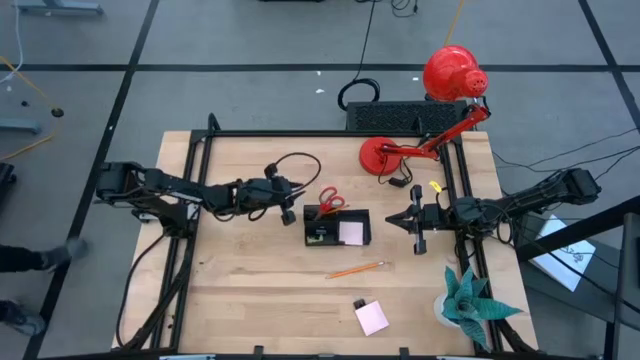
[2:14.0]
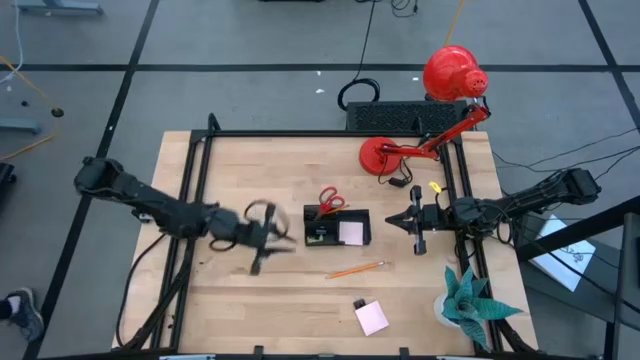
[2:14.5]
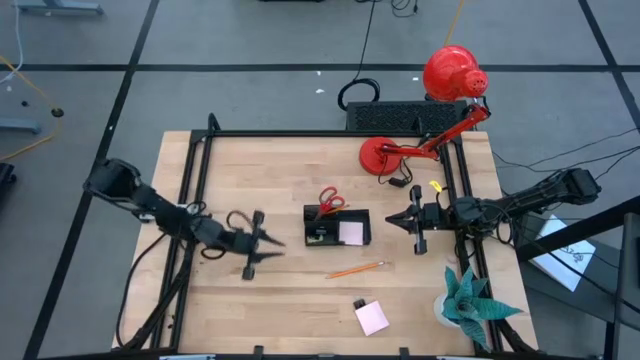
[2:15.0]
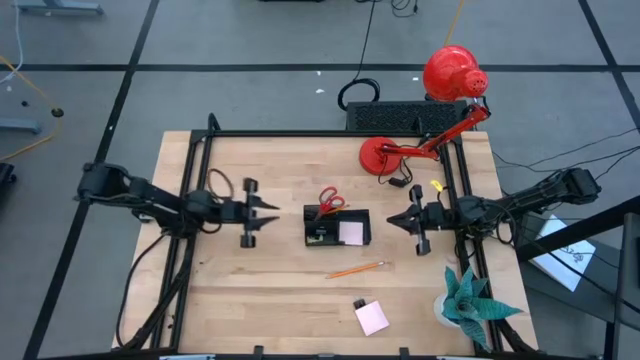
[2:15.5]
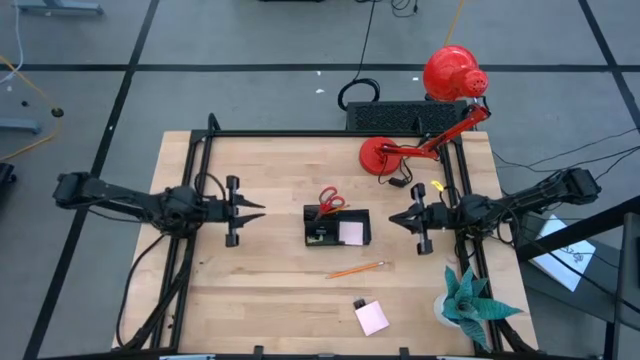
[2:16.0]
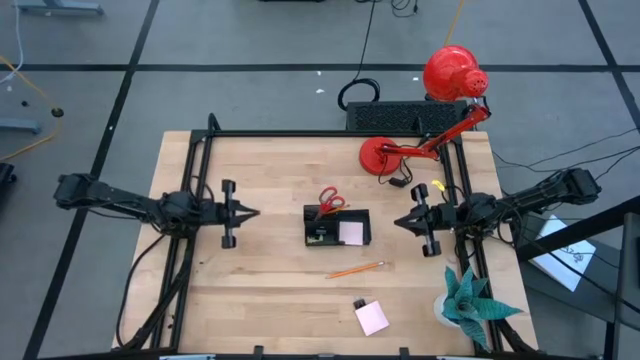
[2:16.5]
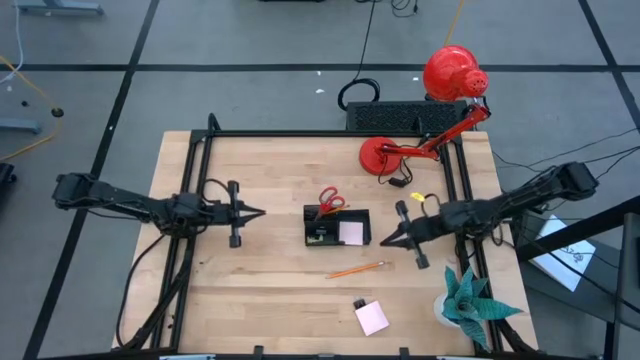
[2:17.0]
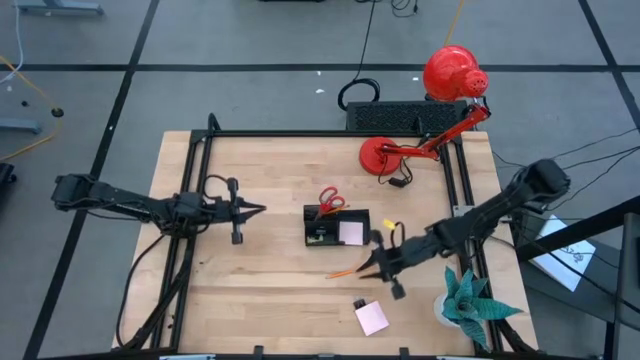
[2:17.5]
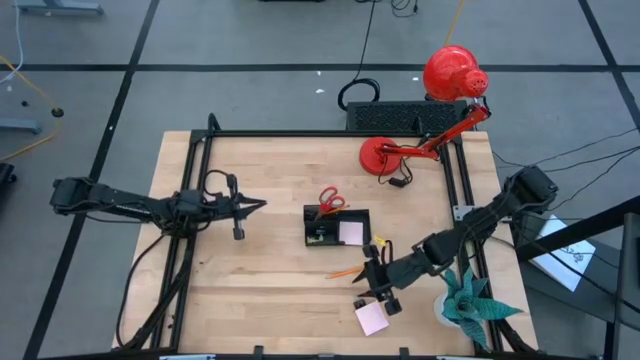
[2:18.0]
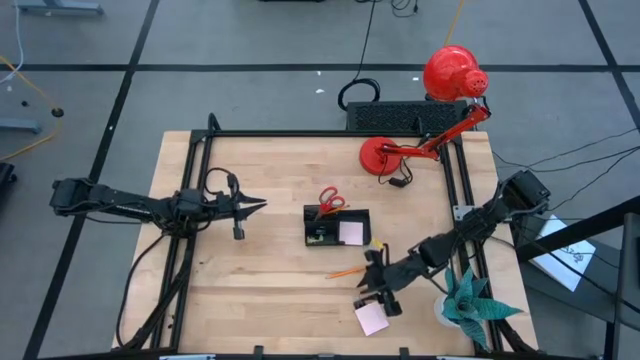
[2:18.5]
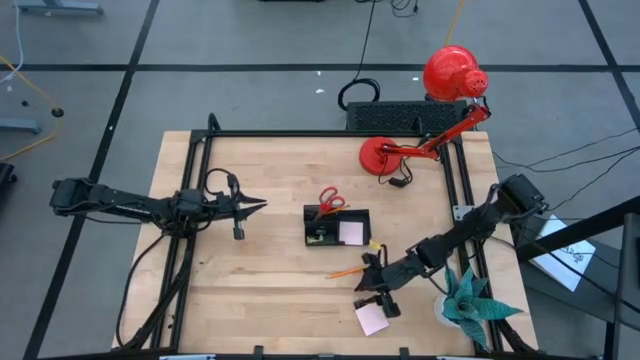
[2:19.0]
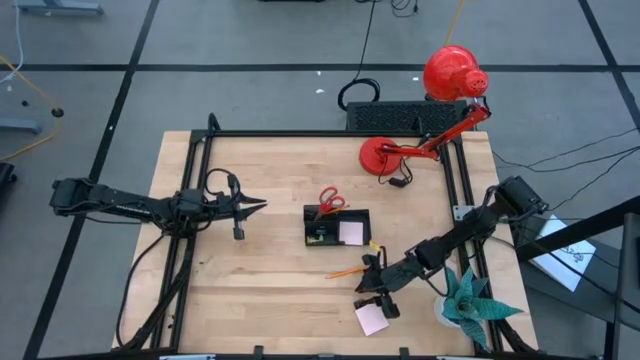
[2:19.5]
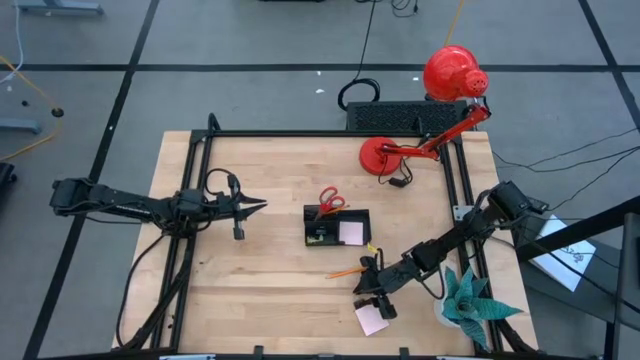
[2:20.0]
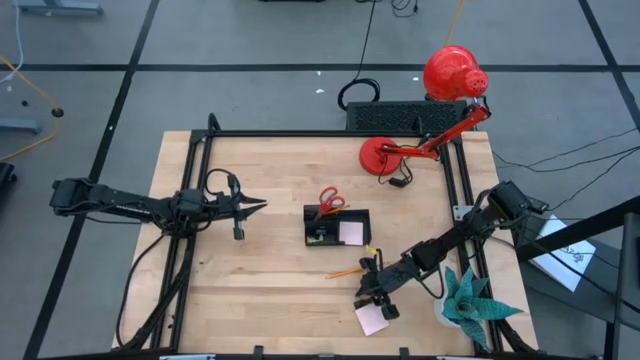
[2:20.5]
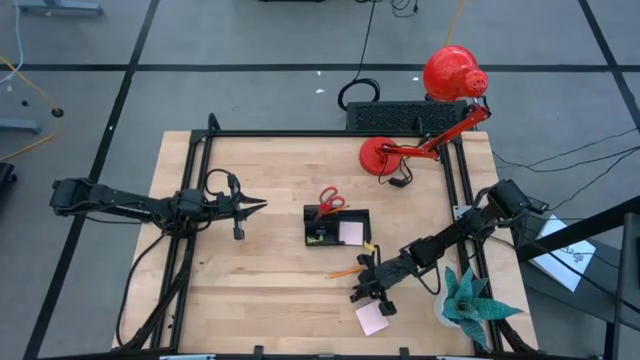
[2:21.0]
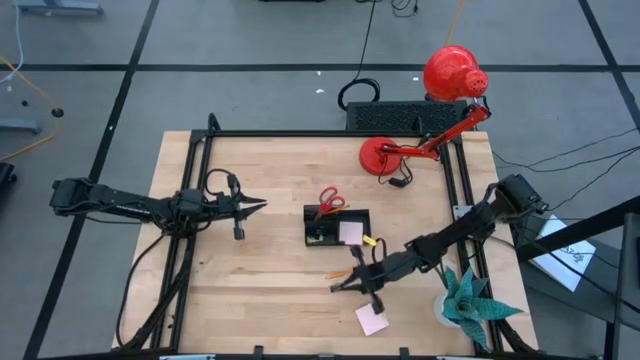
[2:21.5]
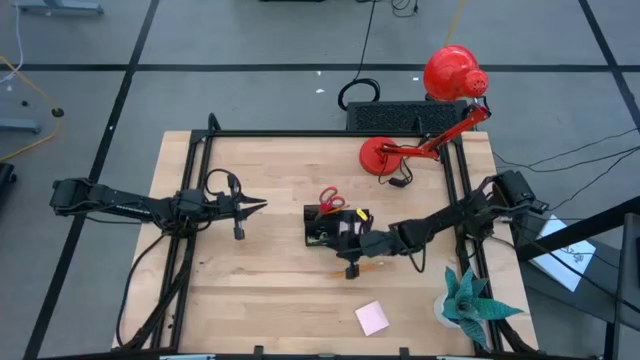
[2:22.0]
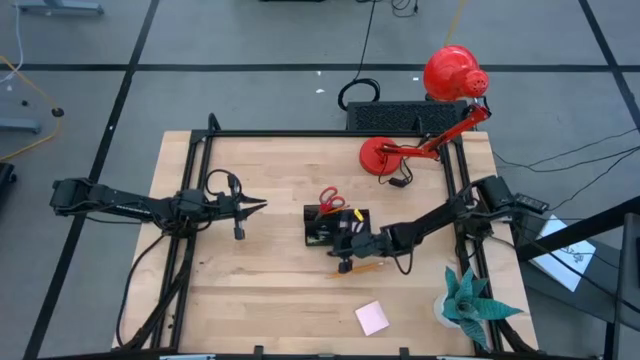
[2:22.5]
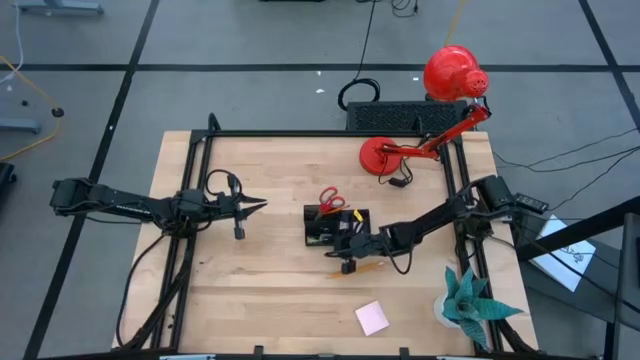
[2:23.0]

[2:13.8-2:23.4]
Task: Pick and place office supplies into organizer
Put the binder clip into the bottom left compartment of the desk organizer

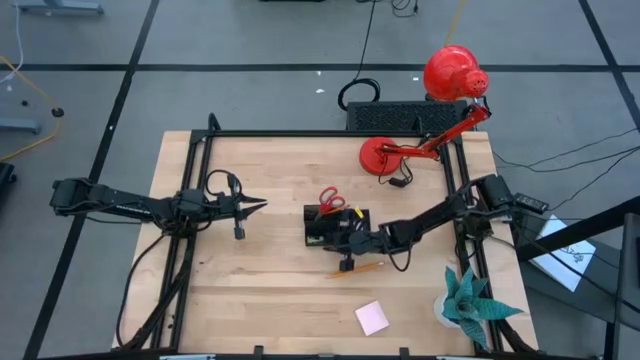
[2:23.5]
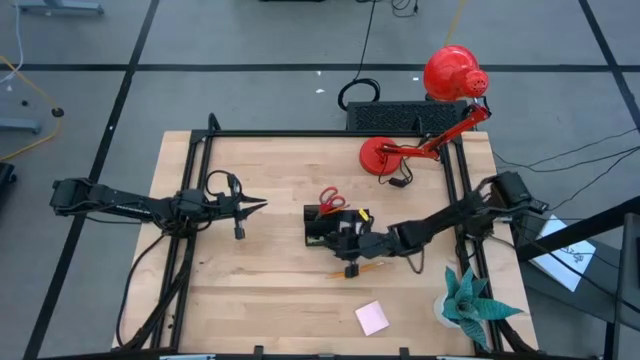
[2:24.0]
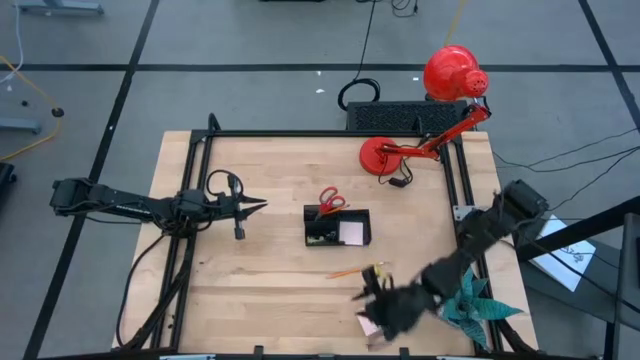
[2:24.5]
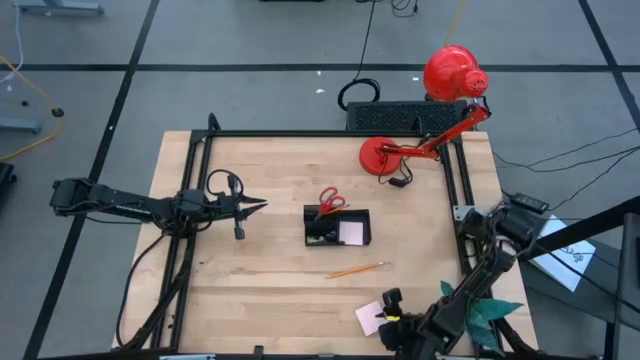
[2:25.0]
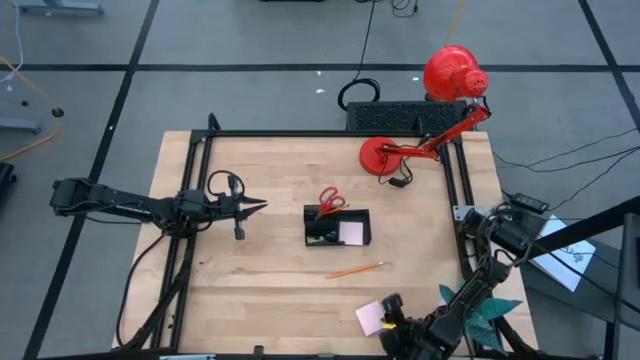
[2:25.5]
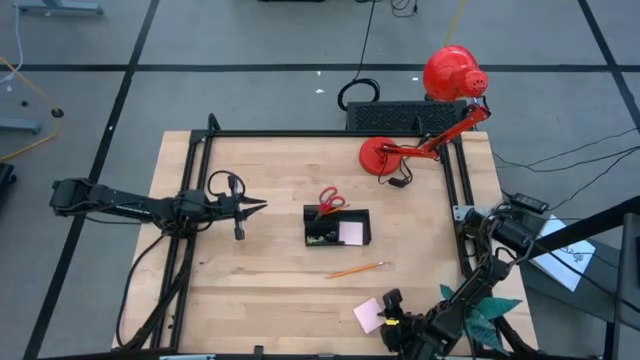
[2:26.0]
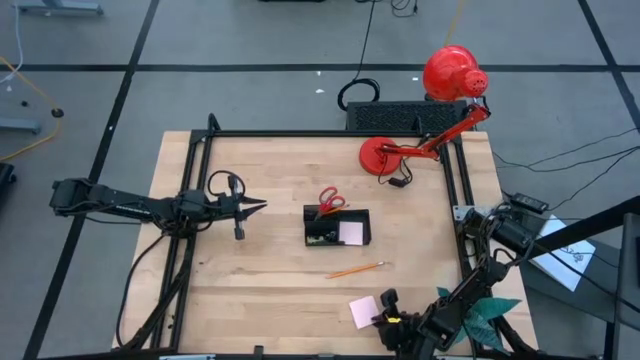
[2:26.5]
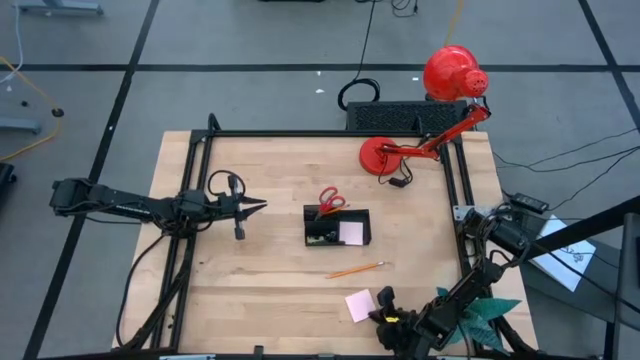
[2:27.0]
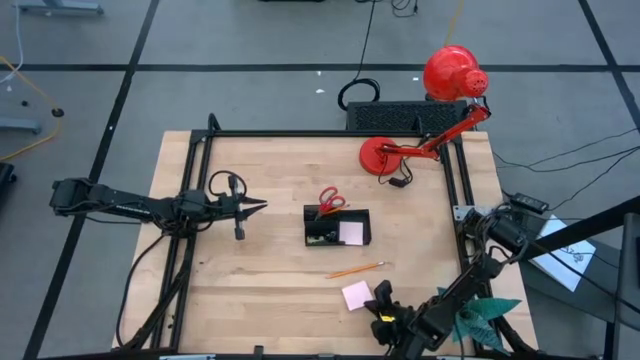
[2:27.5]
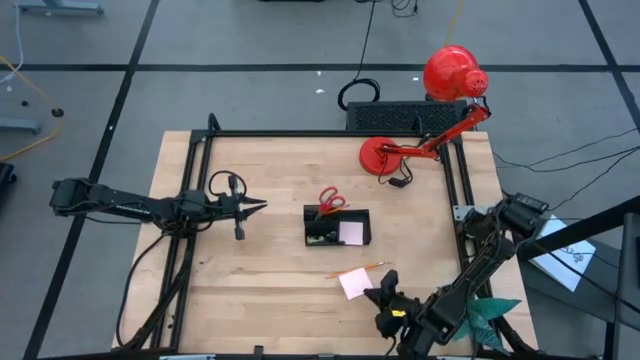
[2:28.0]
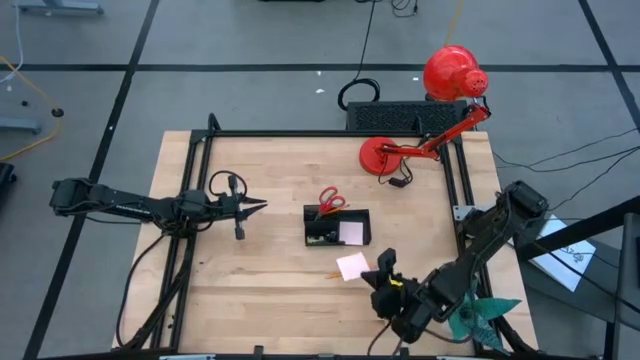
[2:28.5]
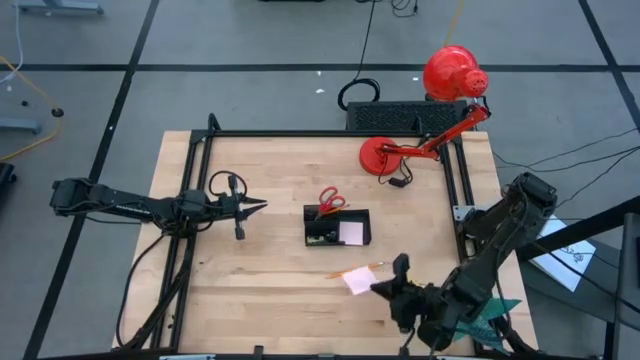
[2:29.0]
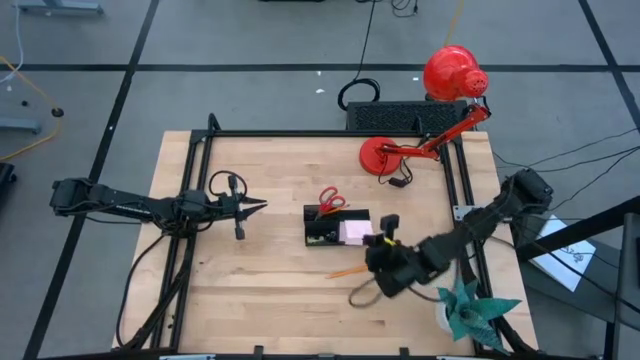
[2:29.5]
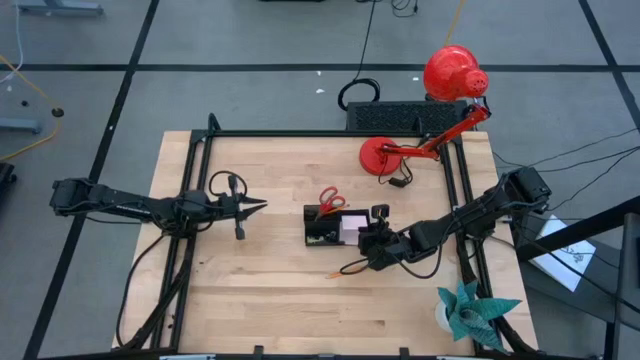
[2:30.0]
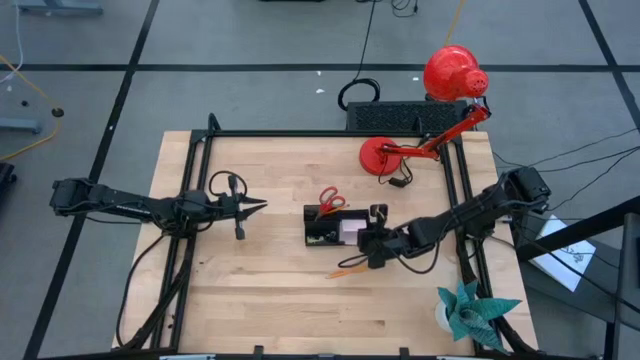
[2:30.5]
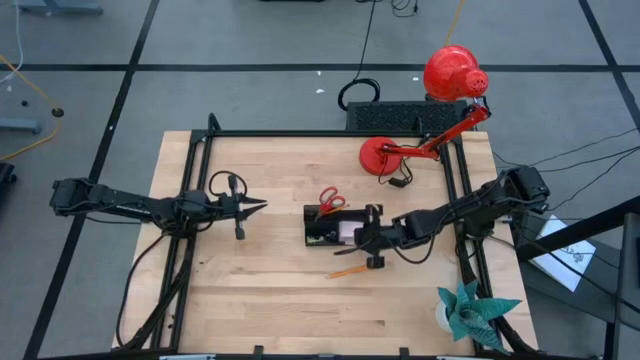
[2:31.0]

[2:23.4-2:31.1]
Put the sticky note into the desk organizer

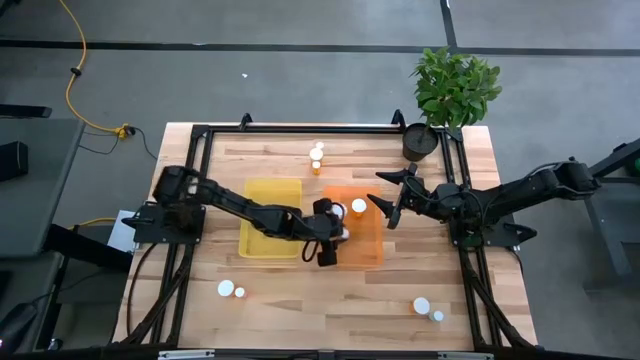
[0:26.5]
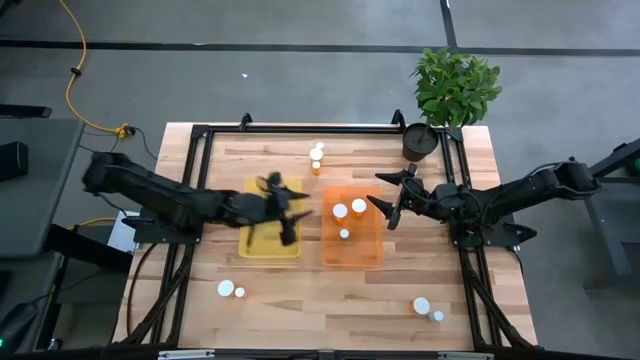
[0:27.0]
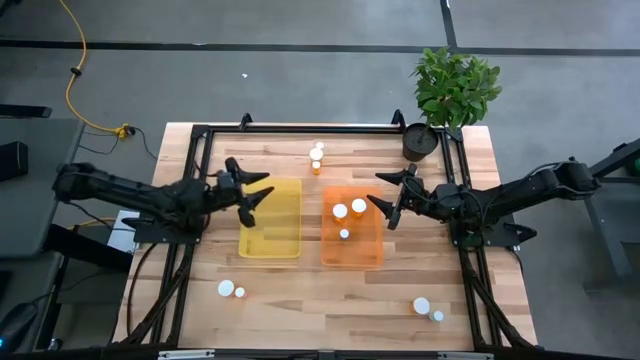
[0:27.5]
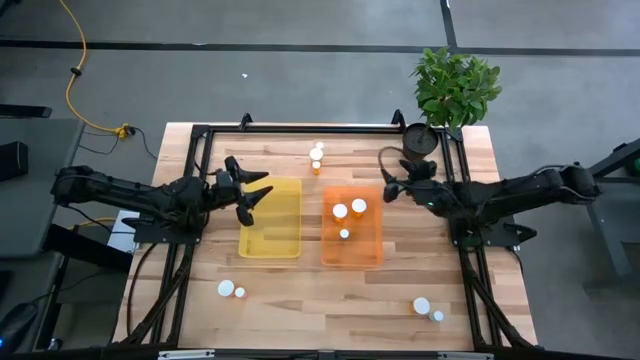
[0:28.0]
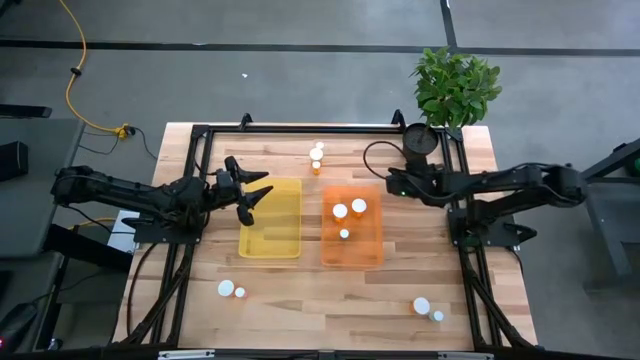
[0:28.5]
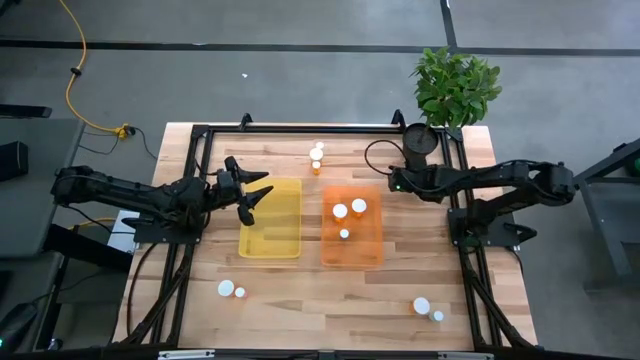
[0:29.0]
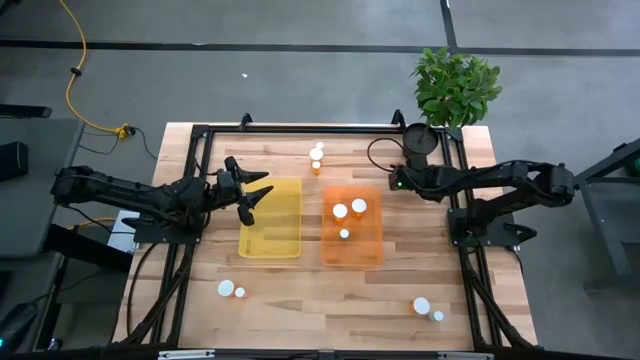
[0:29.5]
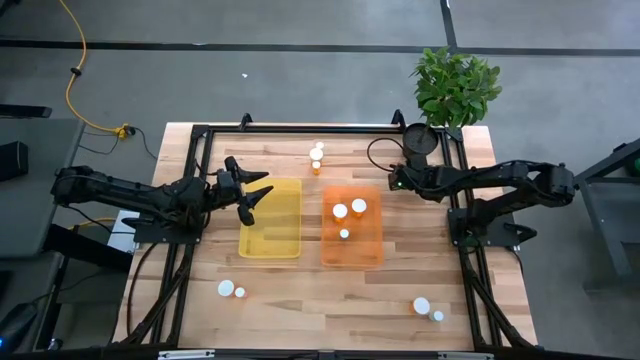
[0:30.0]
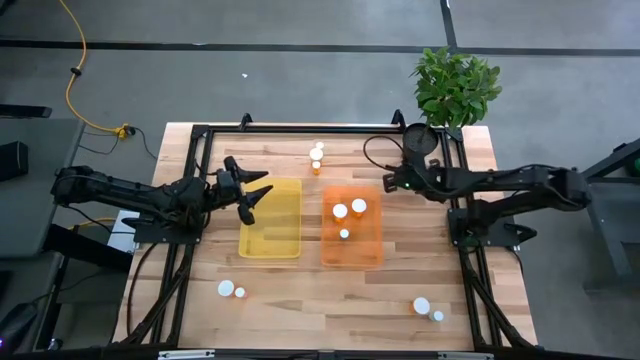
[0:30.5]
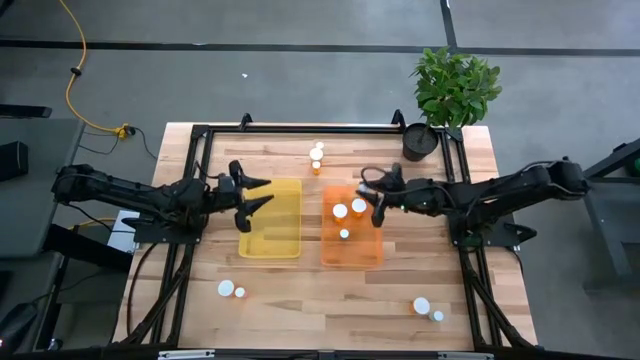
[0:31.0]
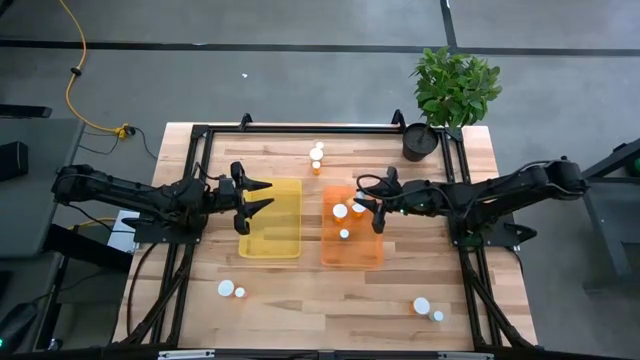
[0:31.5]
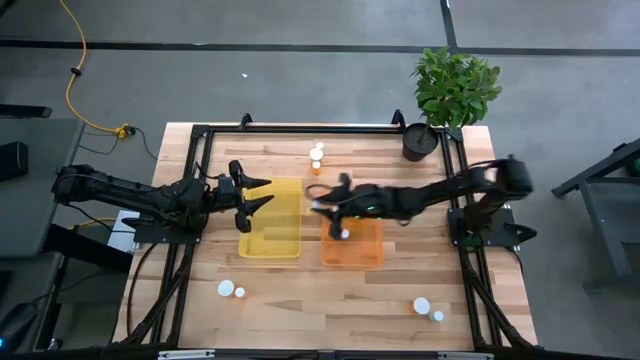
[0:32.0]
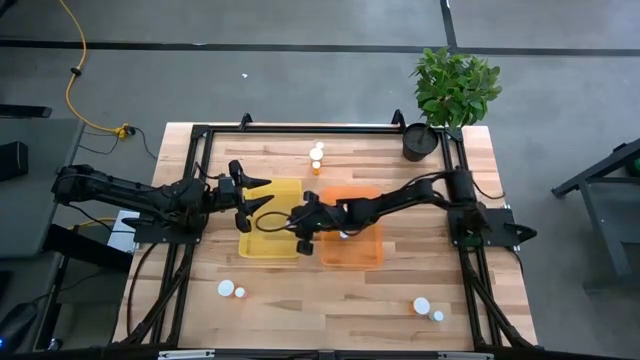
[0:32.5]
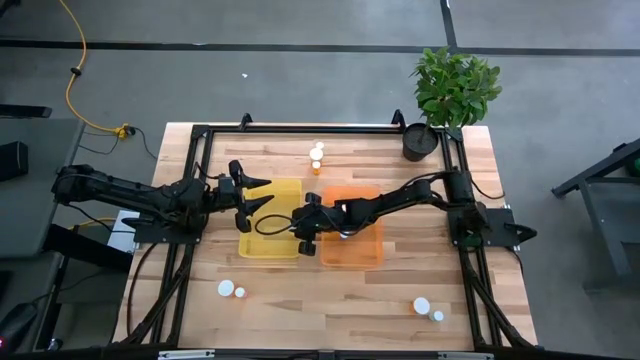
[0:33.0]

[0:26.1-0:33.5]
Task: Pick and place medicine bottles into bin by pill shape (circle, oval)
Put the left blue bottle pill into the orange bin
